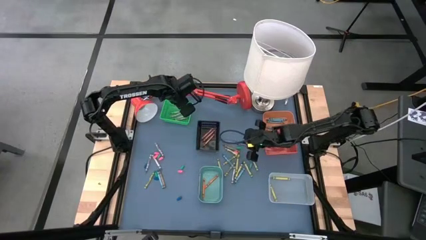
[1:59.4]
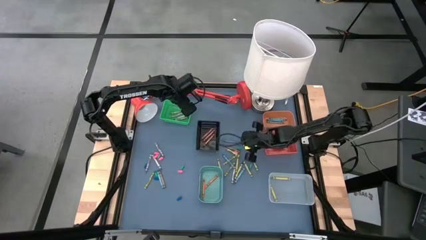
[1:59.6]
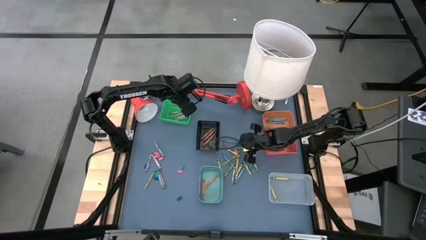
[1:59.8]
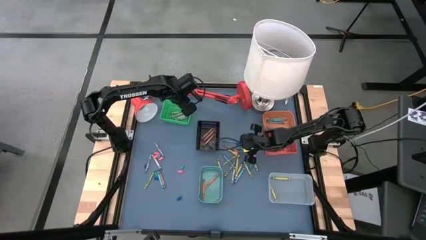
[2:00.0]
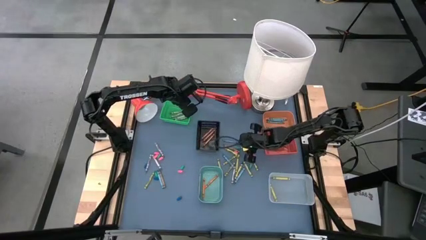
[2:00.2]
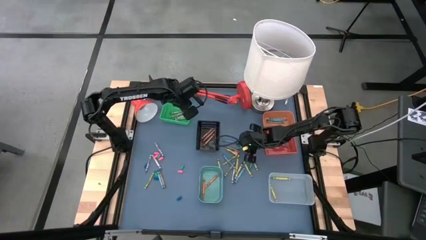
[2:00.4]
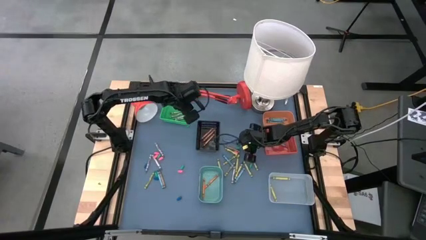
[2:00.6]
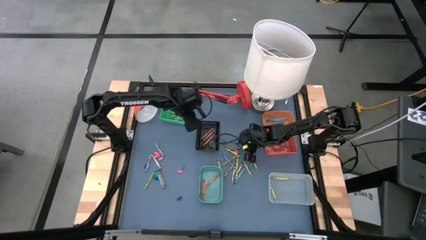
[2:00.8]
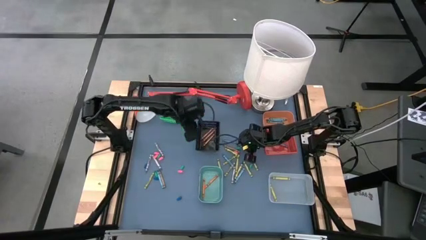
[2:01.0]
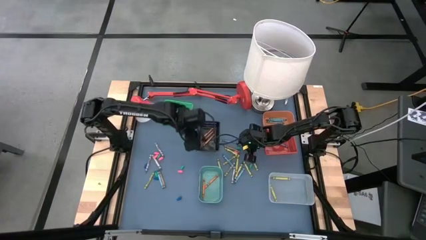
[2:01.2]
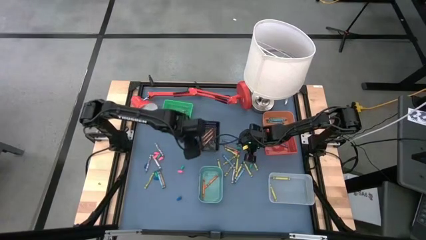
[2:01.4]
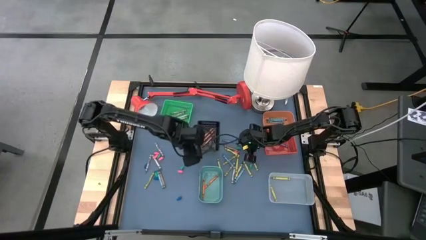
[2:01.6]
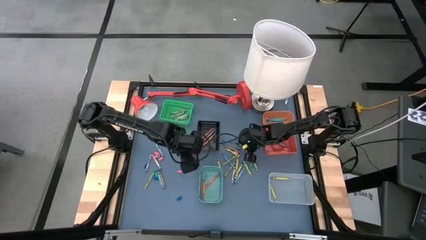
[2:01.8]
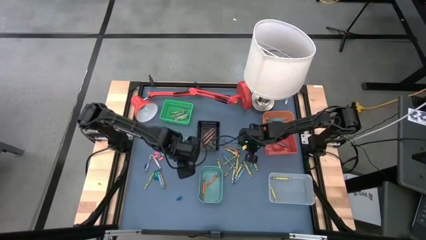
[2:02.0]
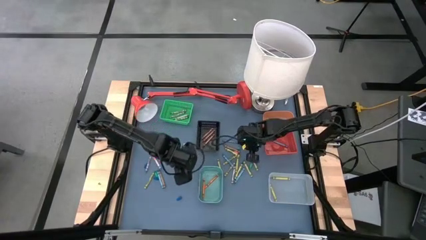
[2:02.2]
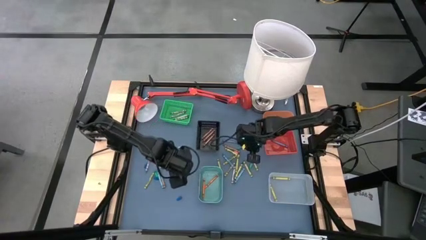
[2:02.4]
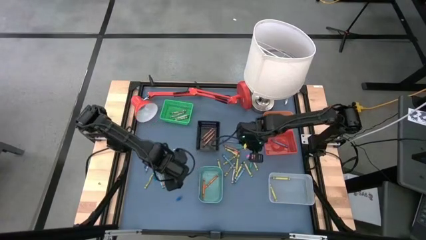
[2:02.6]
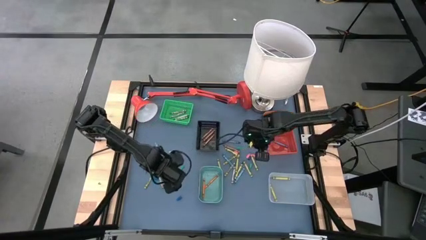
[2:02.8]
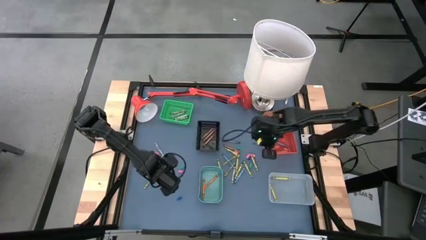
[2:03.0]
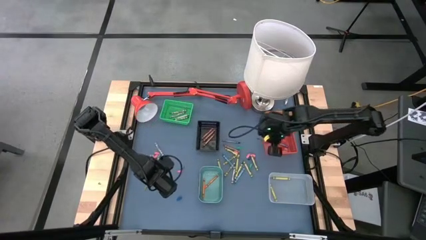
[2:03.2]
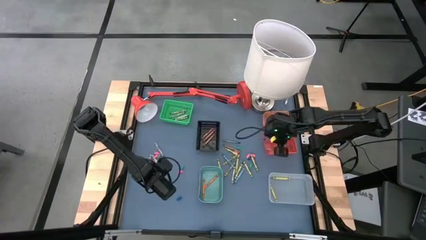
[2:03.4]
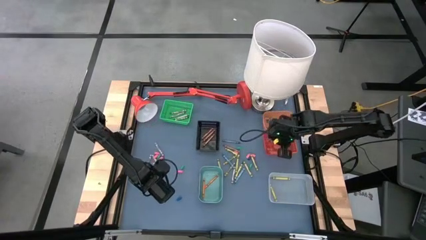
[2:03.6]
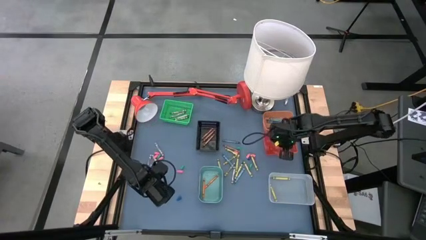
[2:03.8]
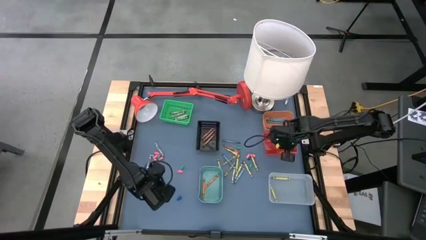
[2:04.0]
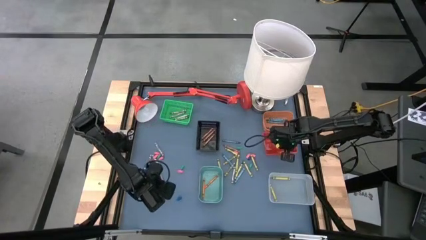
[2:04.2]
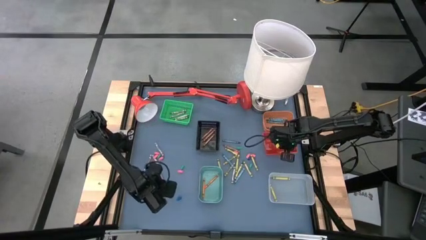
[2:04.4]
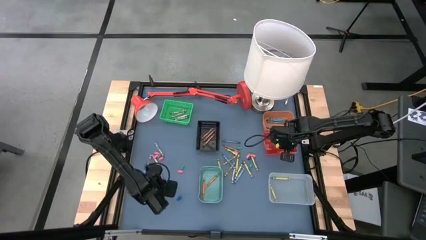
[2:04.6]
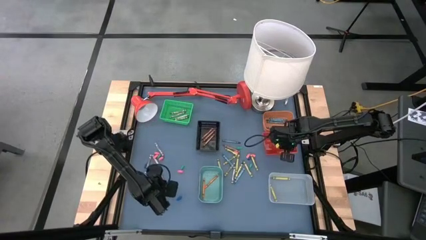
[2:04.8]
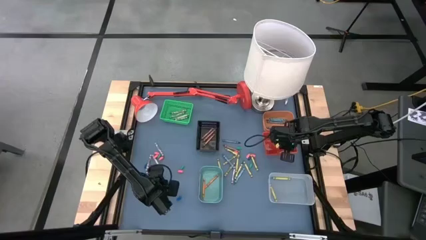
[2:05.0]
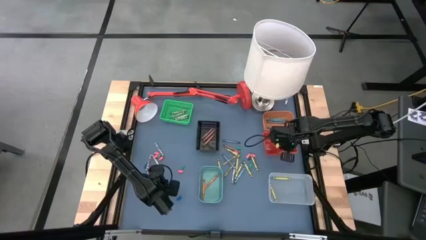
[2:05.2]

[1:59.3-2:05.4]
Task: Sort crayons
Put the purple crayon into the red bin

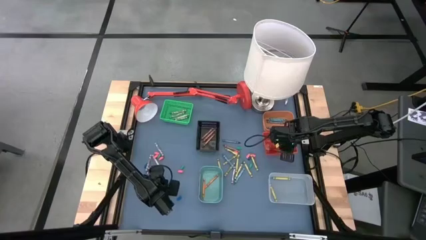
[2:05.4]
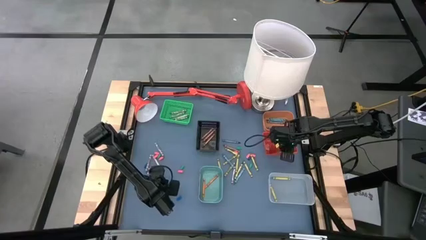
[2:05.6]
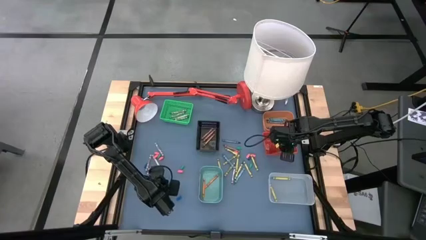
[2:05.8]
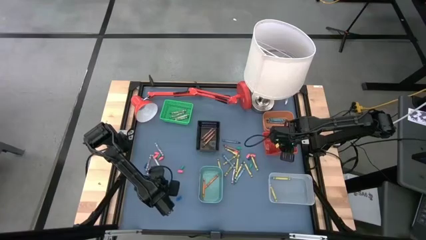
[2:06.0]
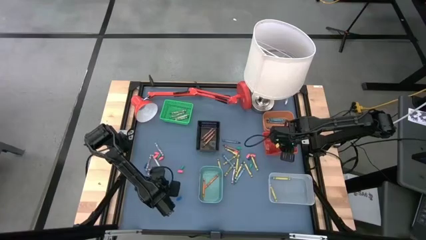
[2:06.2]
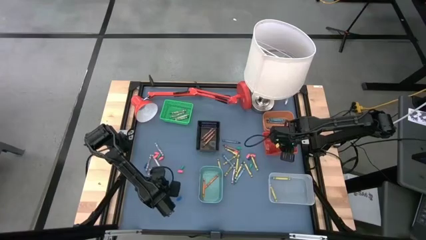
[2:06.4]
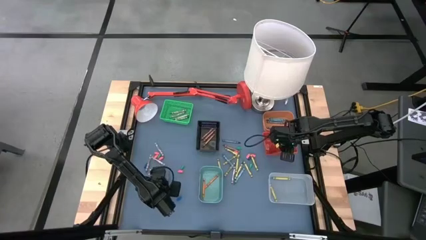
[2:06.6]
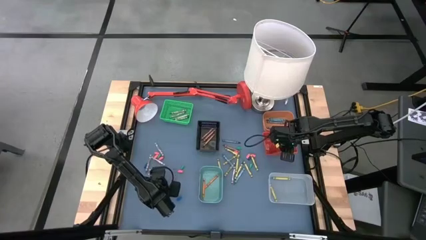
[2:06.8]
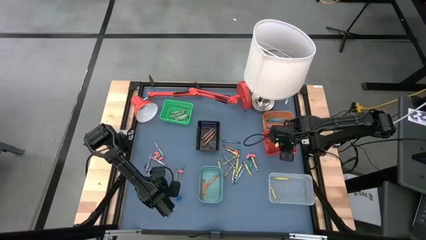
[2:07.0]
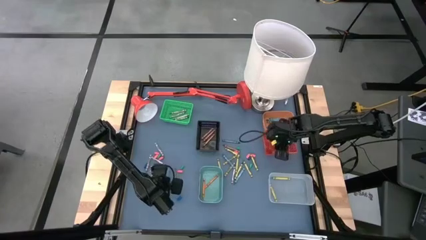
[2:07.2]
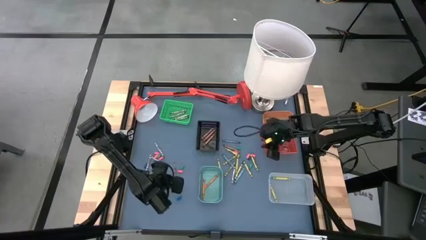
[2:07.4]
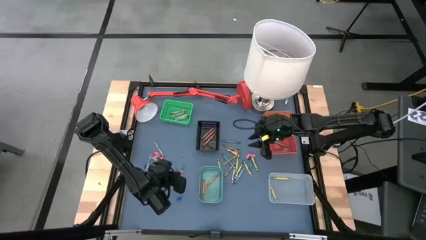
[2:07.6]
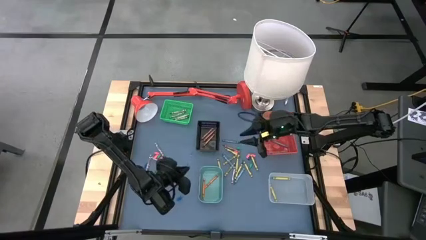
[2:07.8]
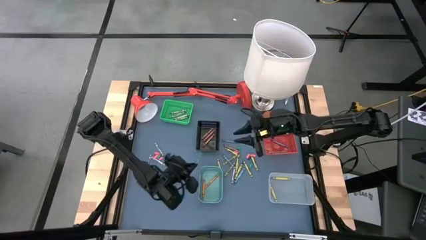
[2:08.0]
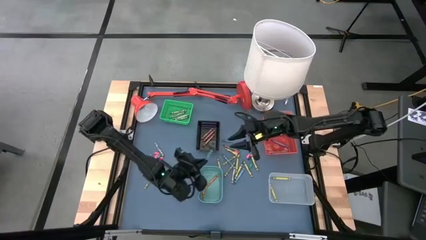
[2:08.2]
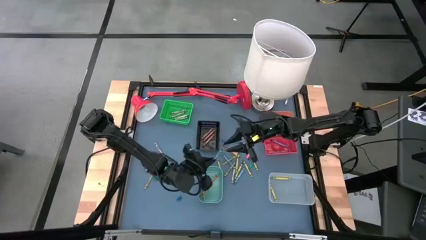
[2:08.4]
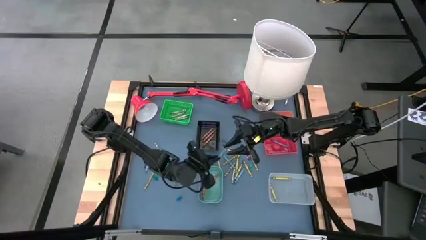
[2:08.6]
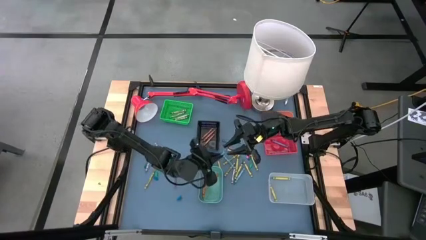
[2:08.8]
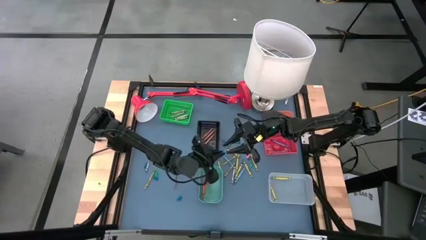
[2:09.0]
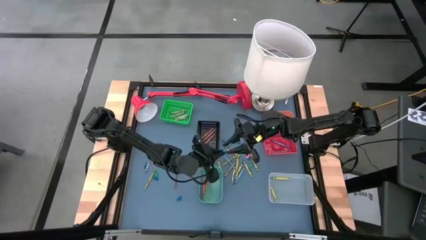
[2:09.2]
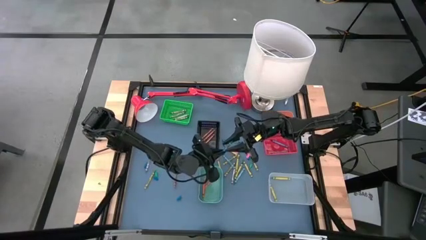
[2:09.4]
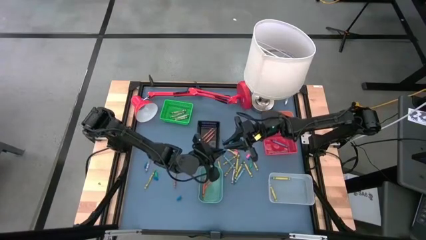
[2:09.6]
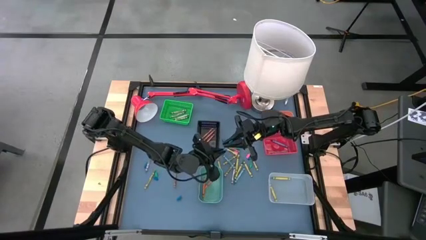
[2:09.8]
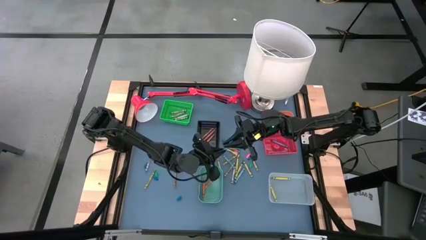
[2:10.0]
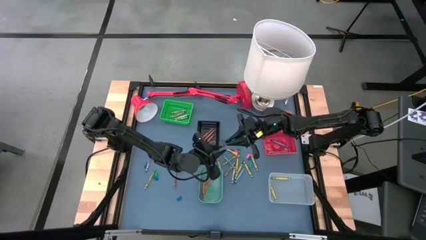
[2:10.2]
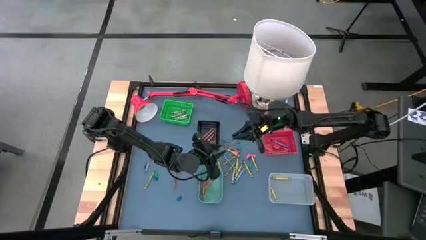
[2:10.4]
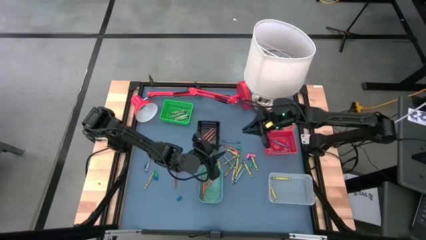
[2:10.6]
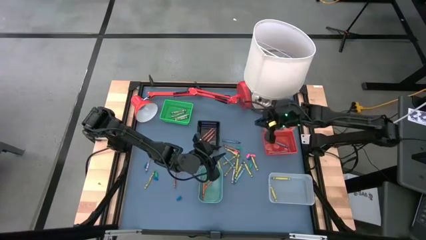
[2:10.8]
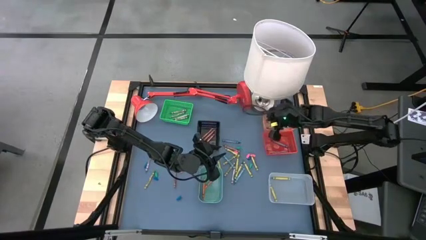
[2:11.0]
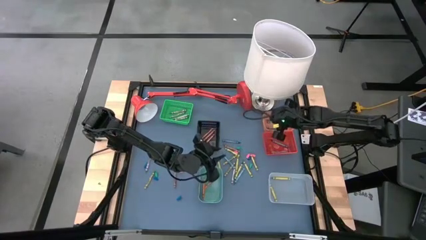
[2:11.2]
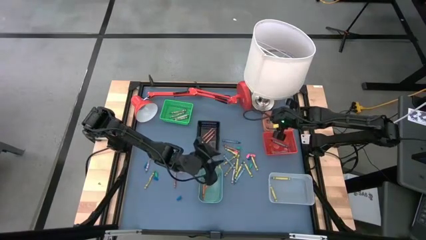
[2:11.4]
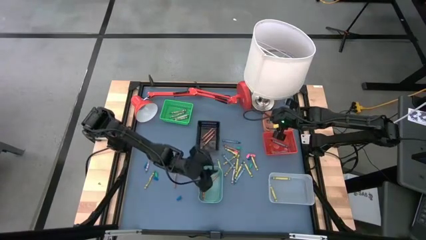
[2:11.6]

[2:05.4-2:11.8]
Put the blue green crayon into the orange bin

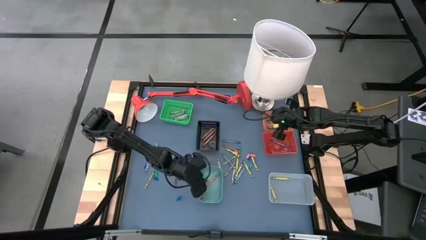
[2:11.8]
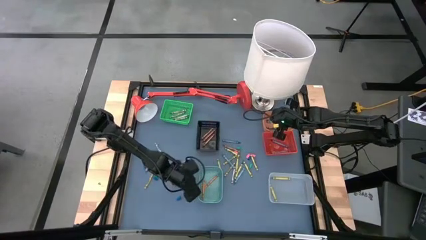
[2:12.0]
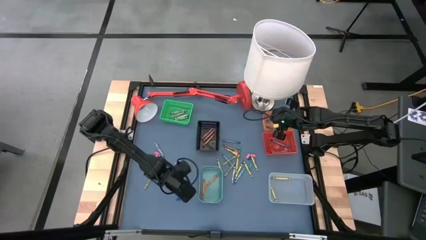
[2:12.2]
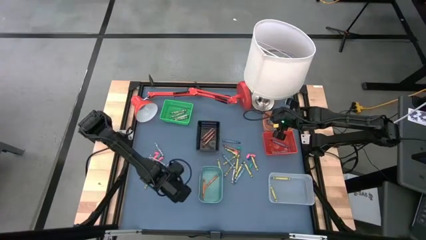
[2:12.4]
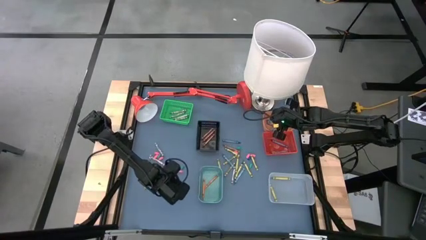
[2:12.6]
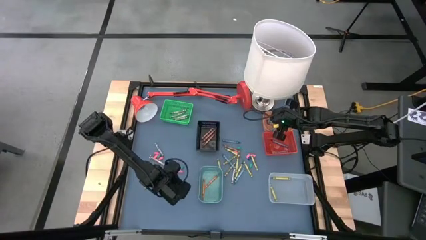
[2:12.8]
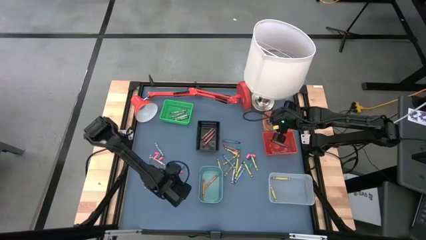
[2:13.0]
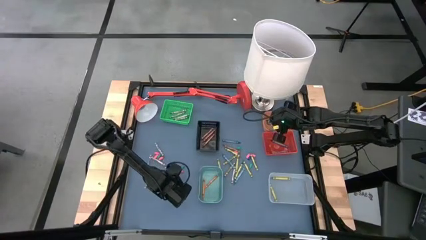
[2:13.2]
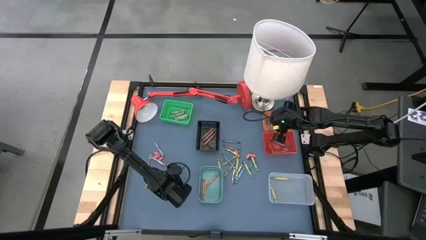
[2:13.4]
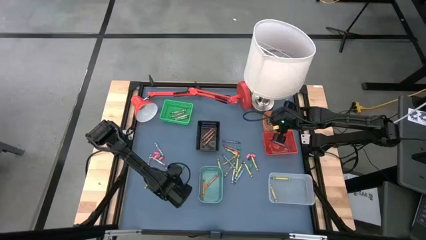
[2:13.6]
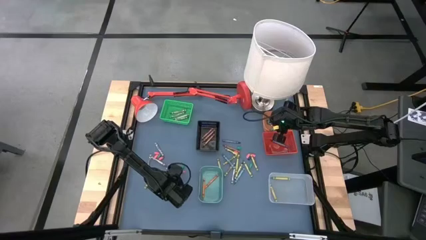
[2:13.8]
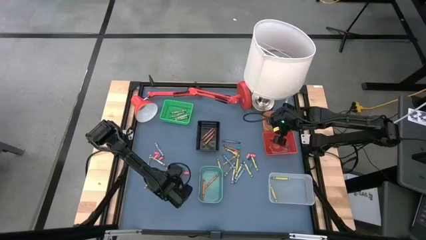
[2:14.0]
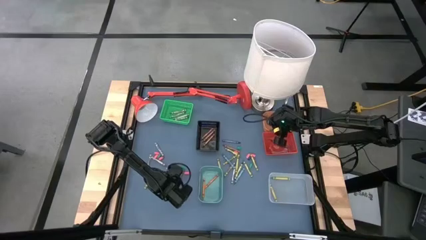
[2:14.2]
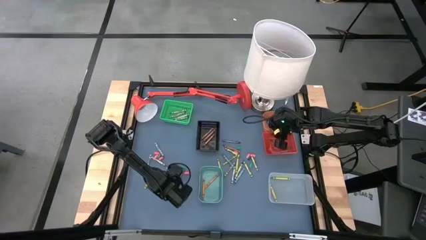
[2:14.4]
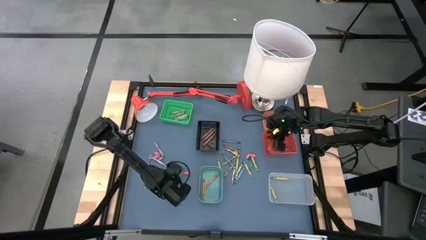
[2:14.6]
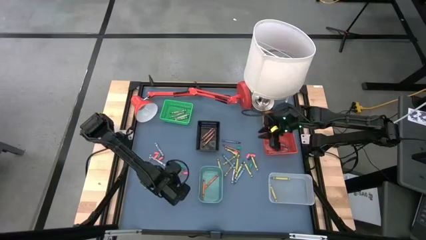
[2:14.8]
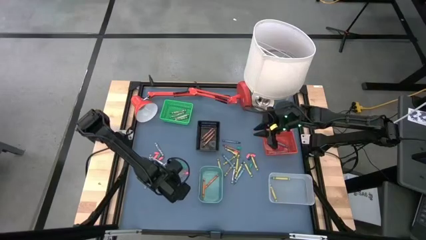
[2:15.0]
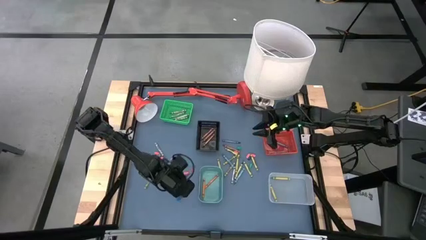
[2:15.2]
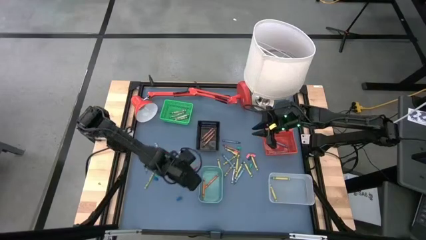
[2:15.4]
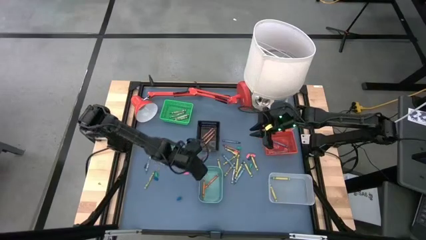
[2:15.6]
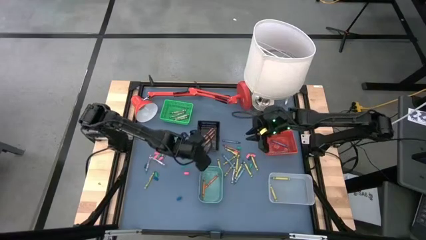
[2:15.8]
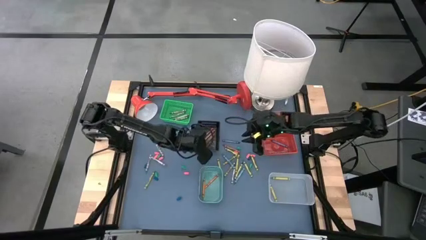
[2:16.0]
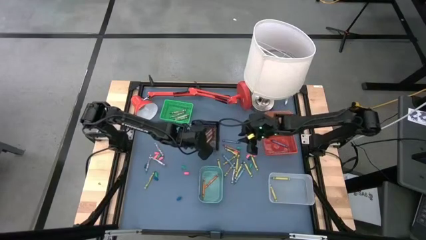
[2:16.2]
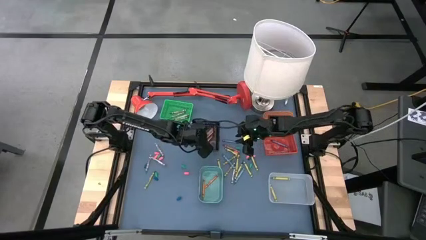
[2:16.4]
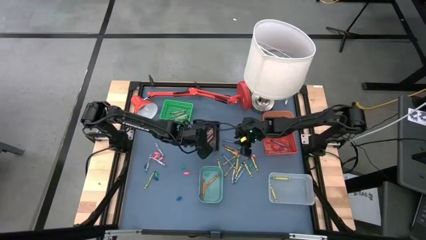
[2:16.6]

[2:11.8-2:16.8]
Put the brown crayon into the black bin
